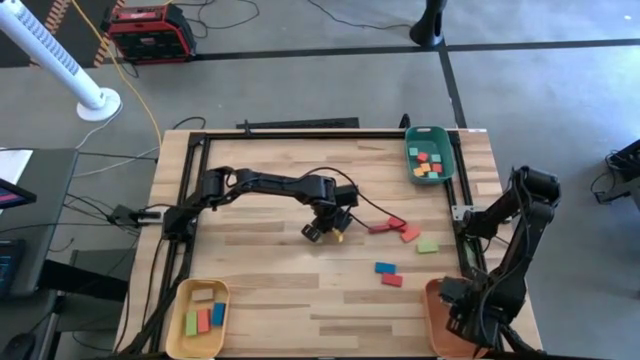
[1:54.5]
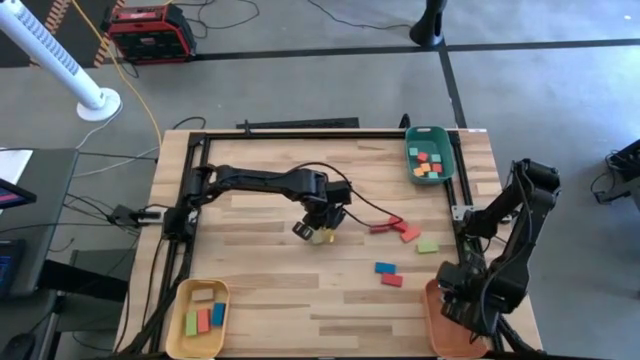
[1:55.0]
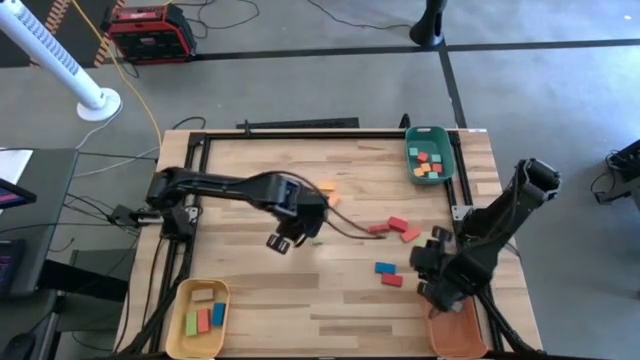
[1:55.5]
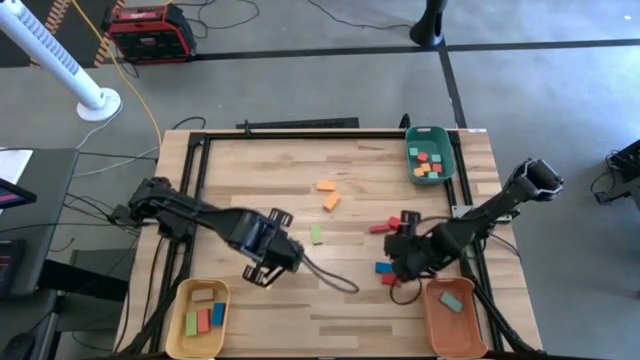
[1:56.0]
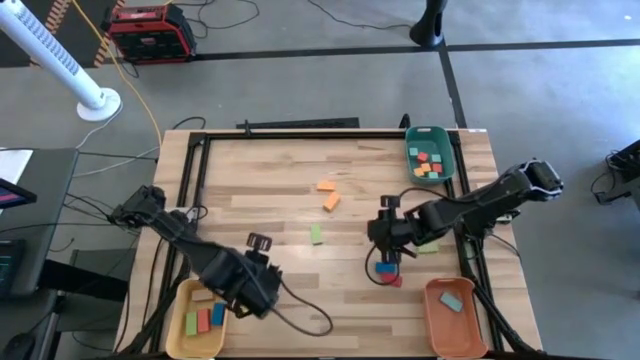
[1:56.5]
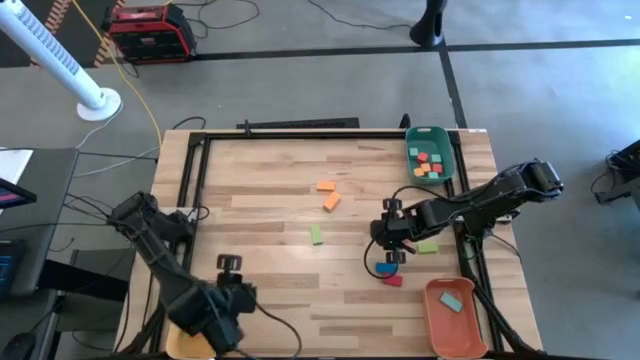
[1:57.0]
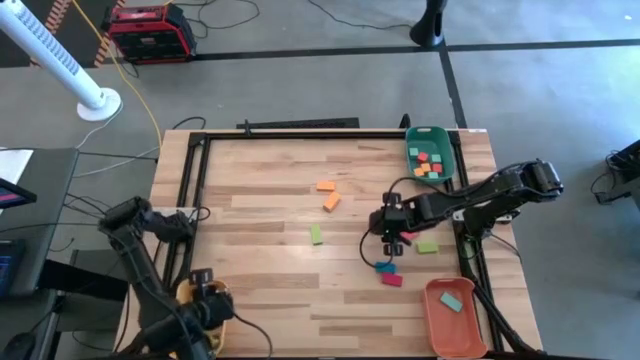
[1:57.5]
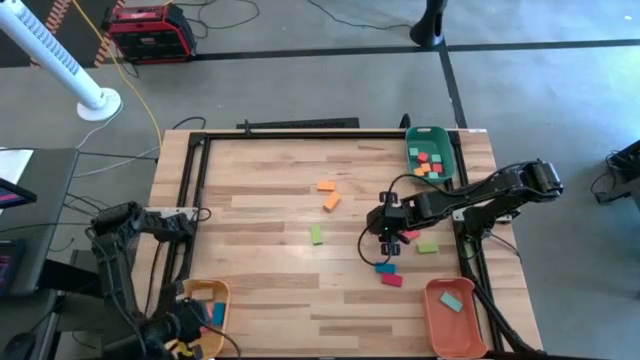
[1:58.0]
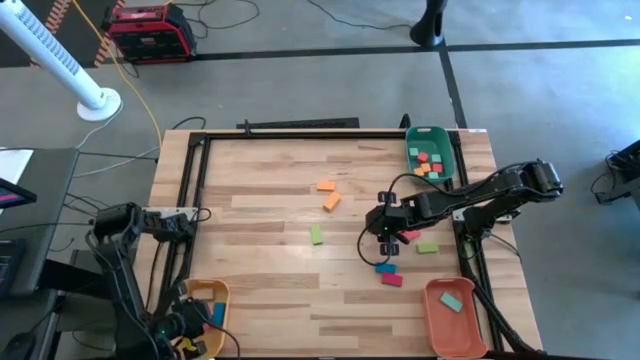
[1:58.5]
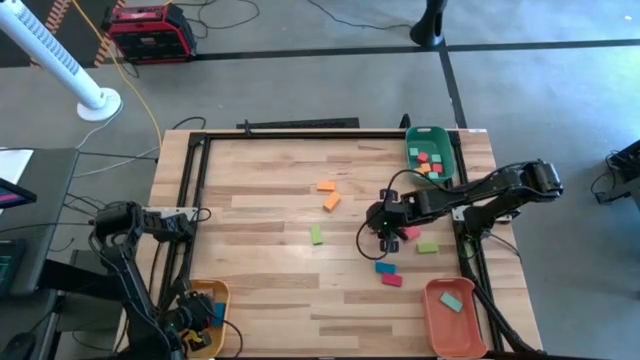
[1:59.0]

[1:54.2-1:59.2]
Task: Sort blocks by size
Put the orange thick rectangle block into the yellow bin

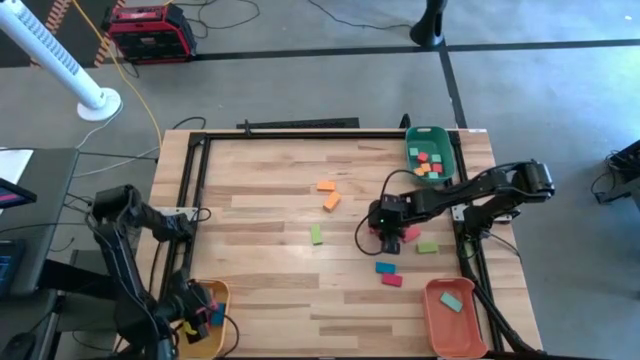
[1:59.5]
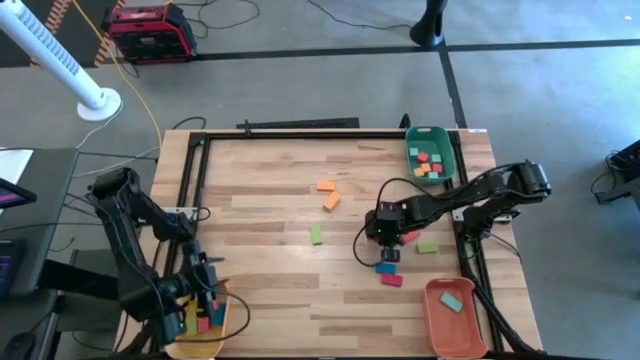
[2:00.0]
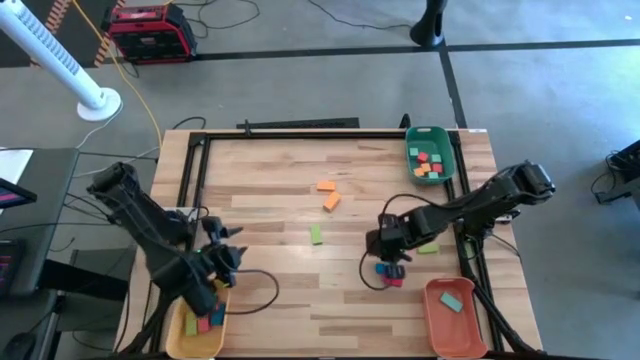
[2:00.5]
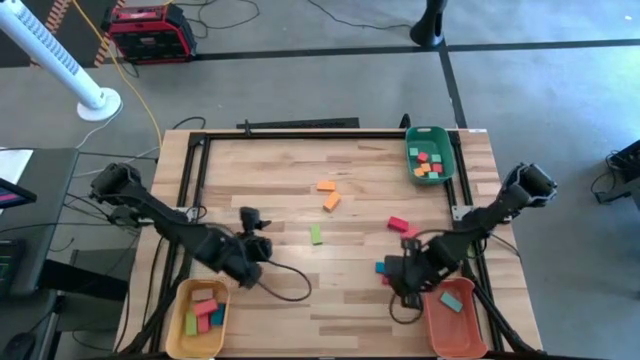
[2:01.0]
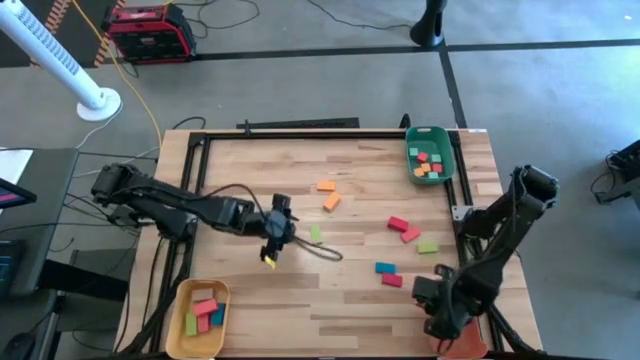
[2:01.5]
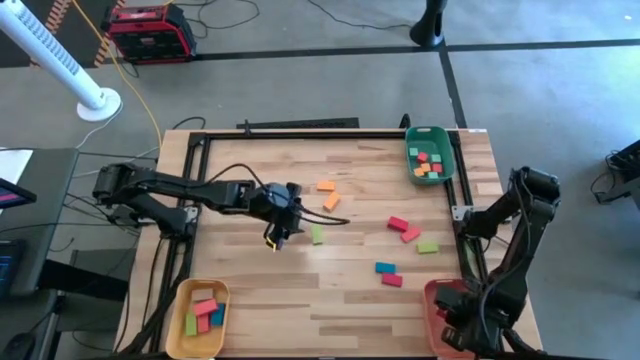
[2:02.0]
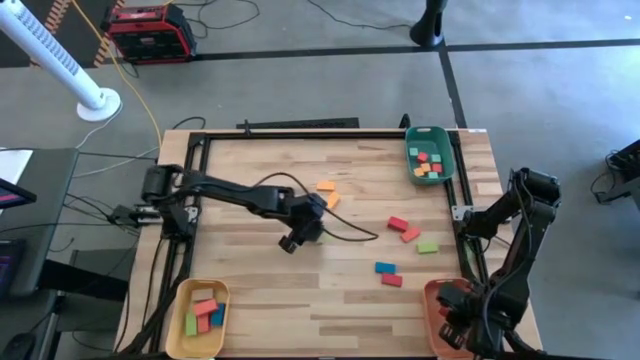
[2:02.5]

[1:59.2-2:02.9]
Put the red thin rectangle block into the orange bin

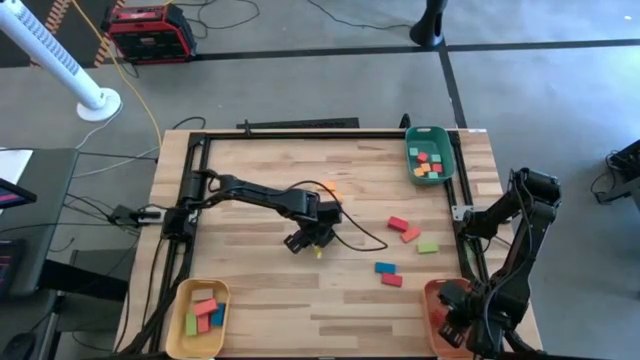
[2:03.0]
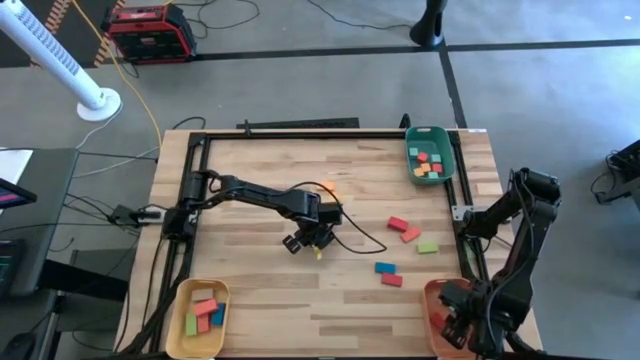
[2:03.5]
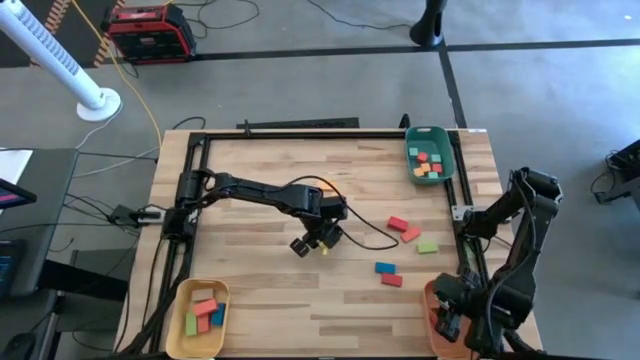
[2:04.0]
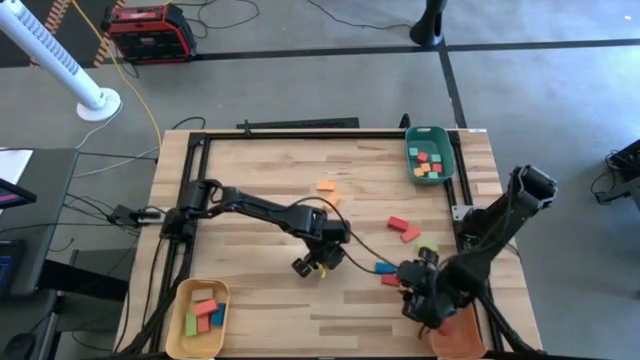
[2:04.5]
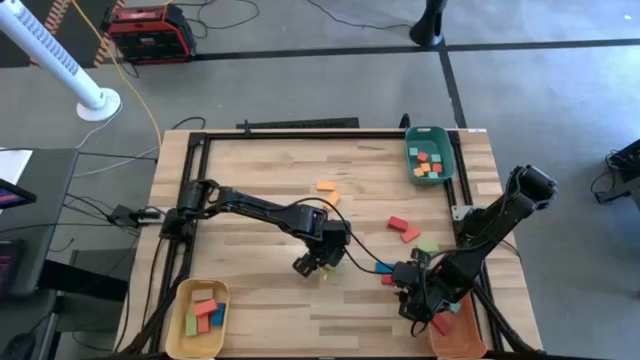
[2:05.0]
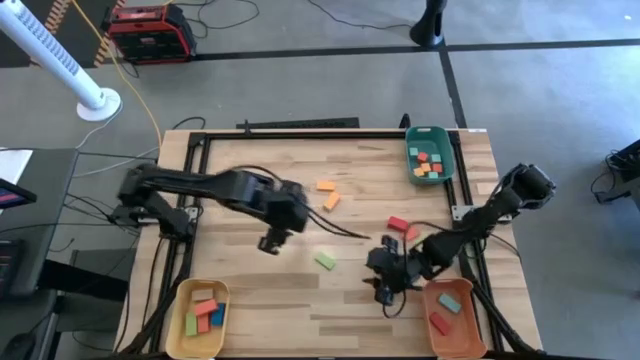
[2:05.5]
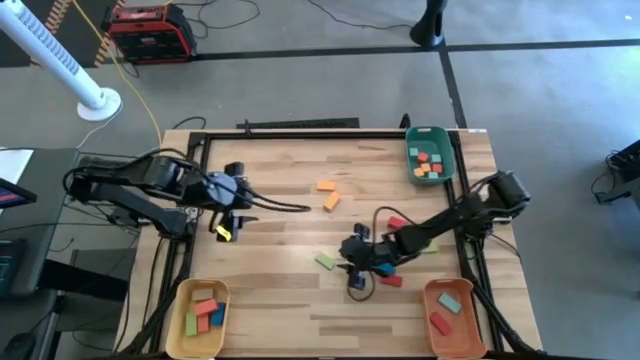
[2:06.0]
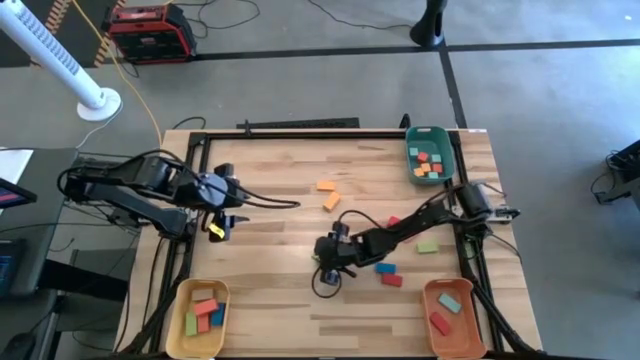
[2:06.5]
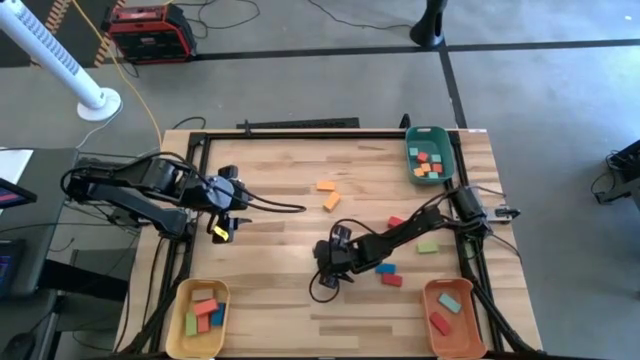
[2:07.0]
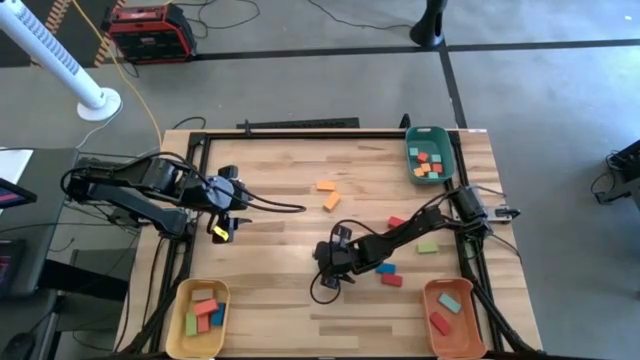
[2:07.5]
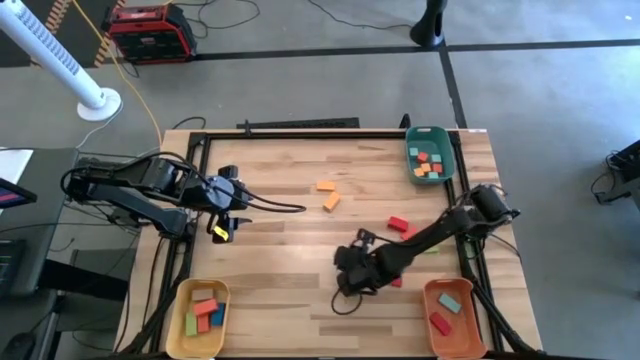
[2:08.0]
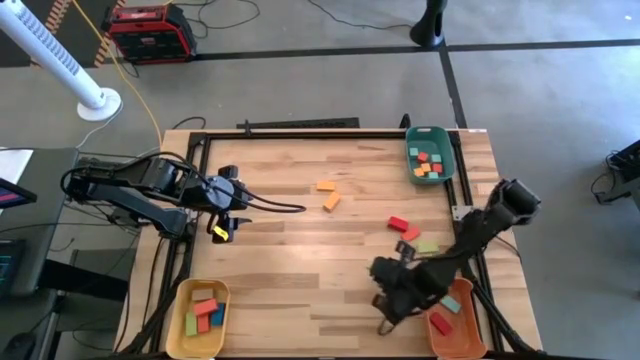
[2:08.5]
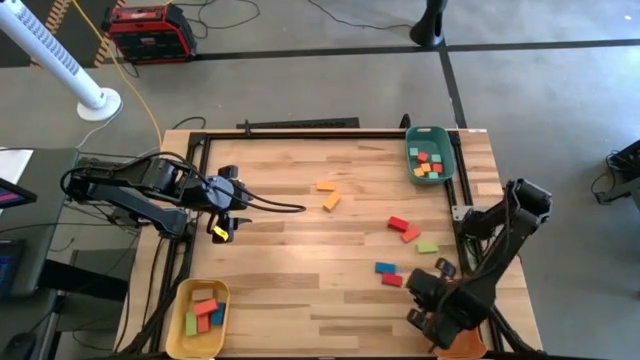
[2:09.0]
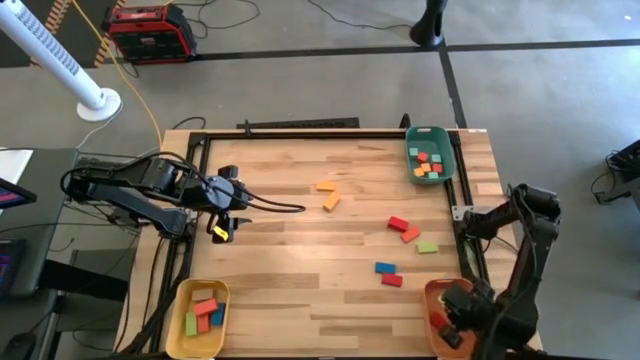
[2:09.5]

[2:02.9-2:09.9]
Put the light thin green rectangle block into the orange bin

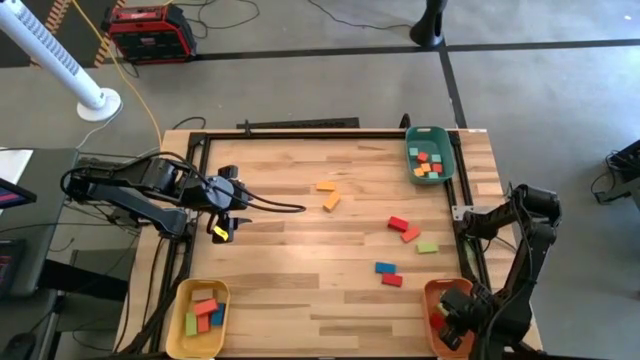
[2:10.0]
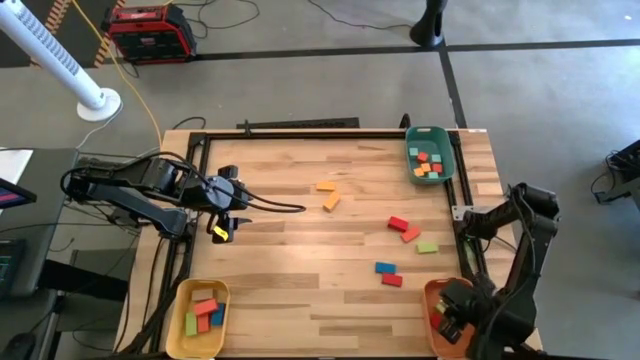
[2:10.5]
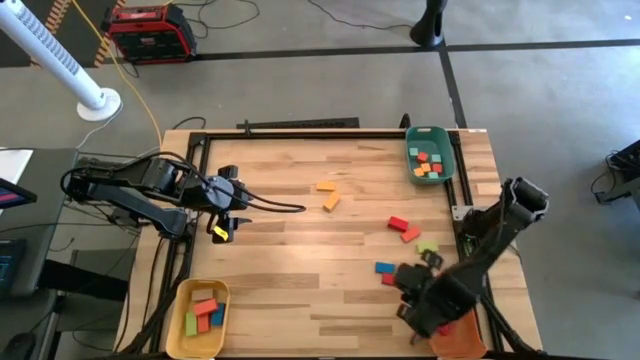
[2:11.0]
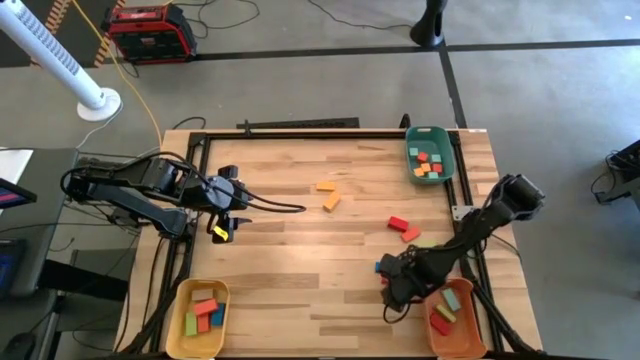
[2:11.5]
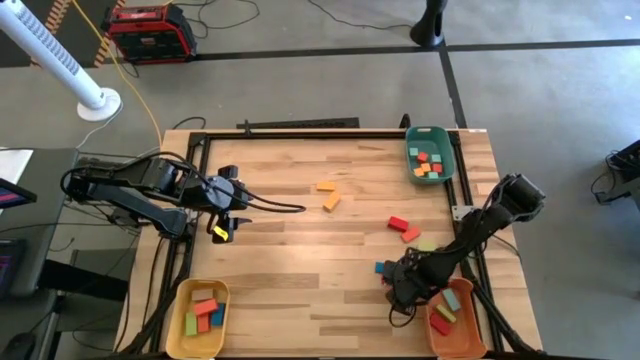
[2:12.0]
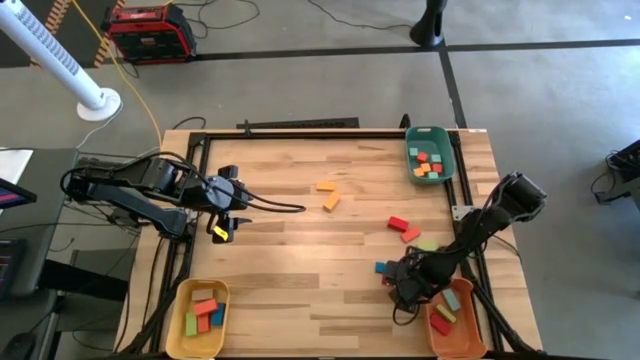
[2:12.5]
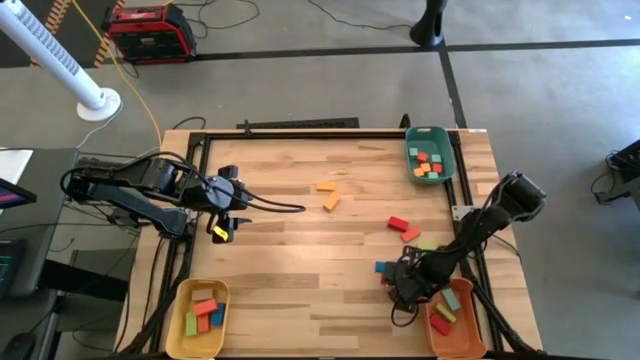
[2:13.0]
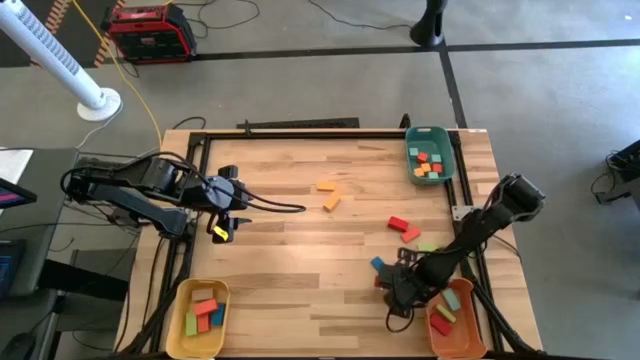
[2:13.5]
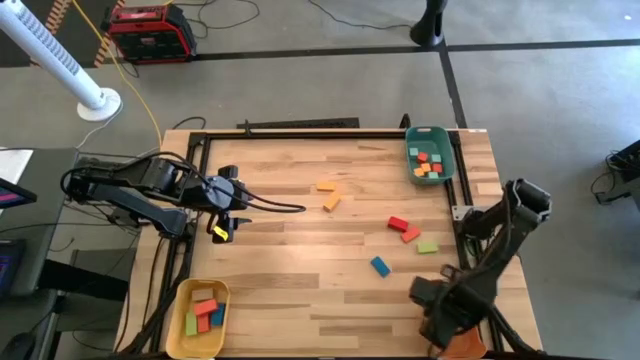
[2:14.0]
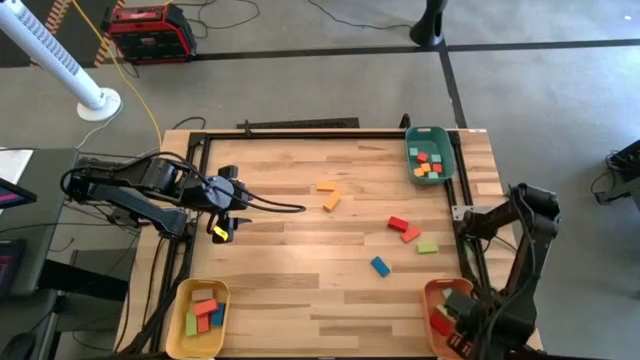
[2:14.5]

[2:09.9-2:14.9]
Put the red thin rectangle block into the orange bin
